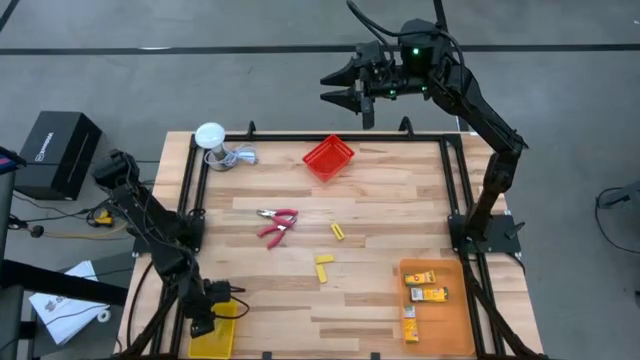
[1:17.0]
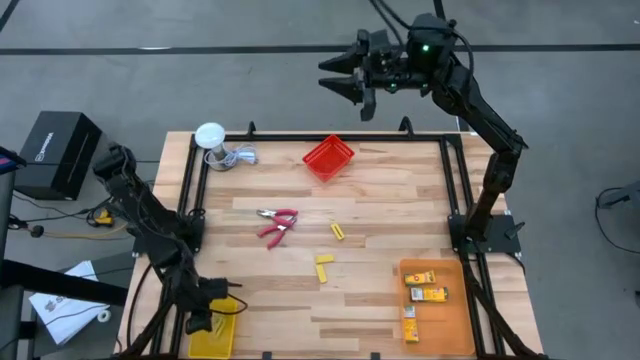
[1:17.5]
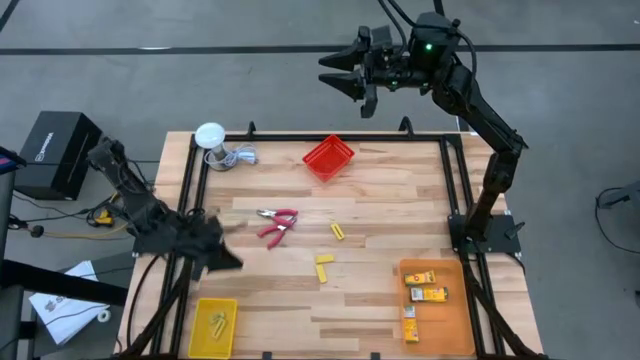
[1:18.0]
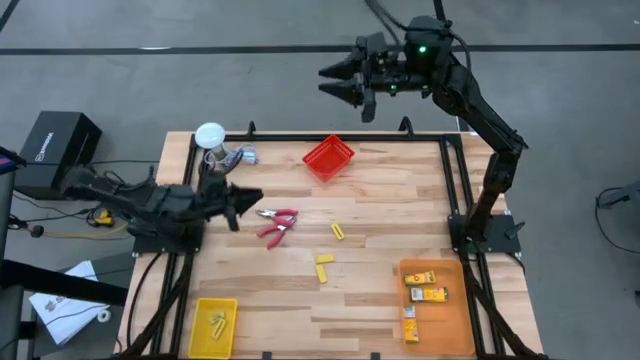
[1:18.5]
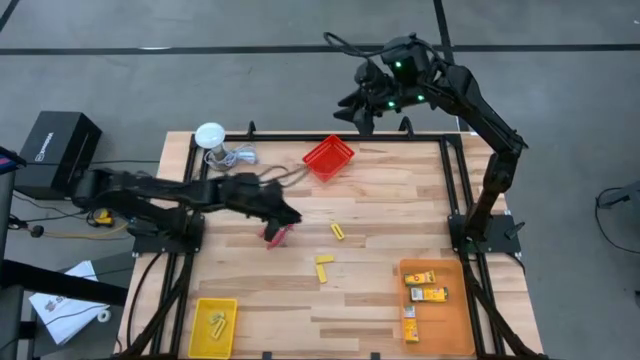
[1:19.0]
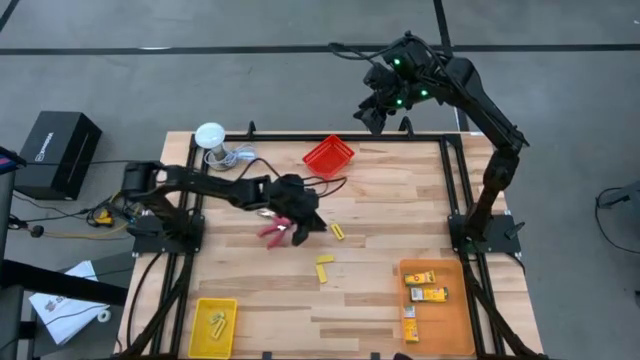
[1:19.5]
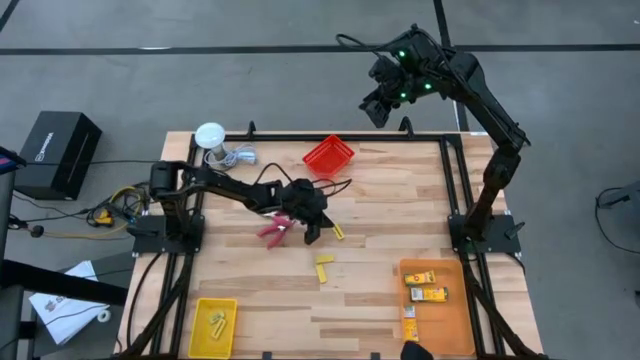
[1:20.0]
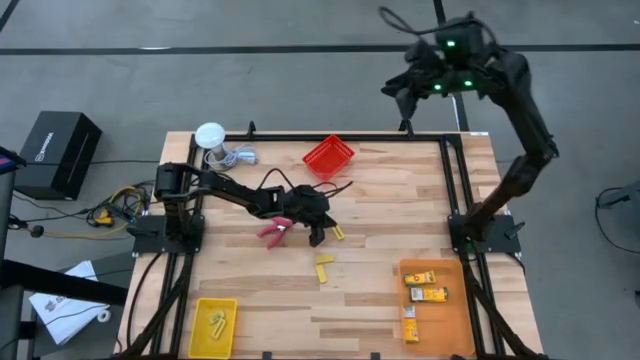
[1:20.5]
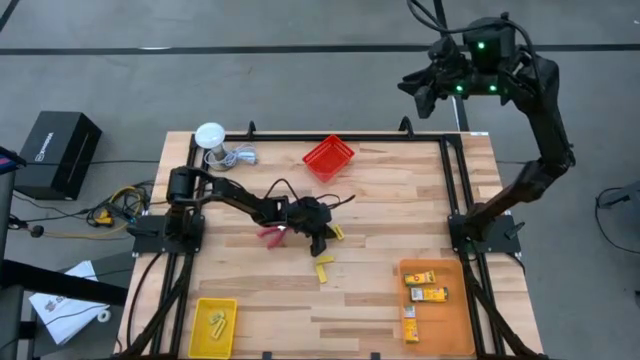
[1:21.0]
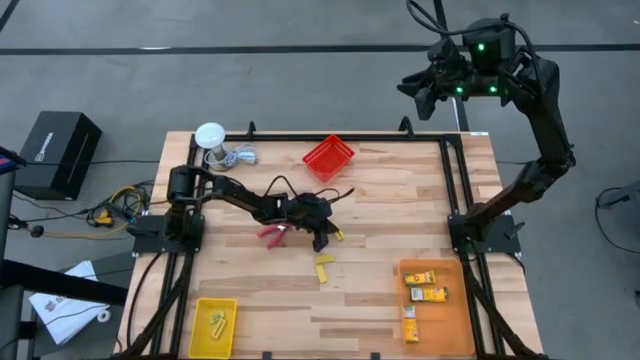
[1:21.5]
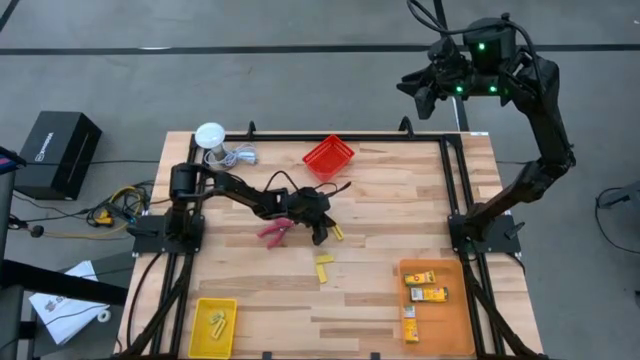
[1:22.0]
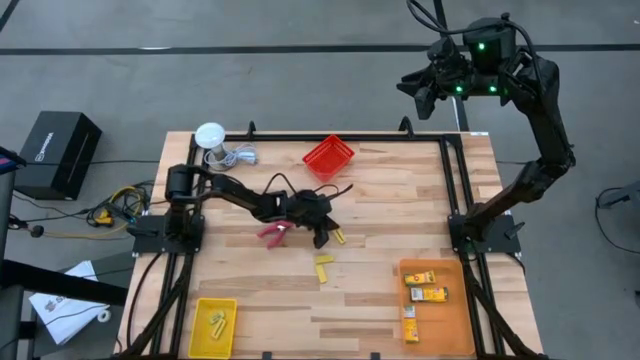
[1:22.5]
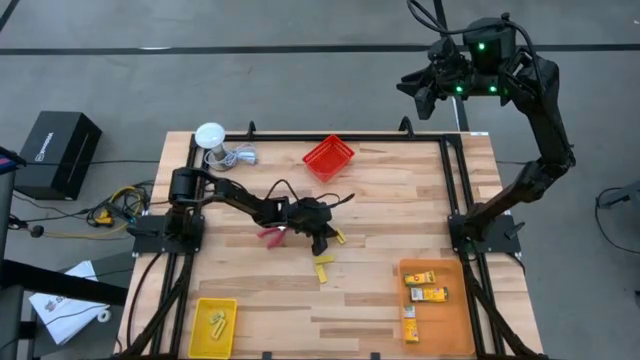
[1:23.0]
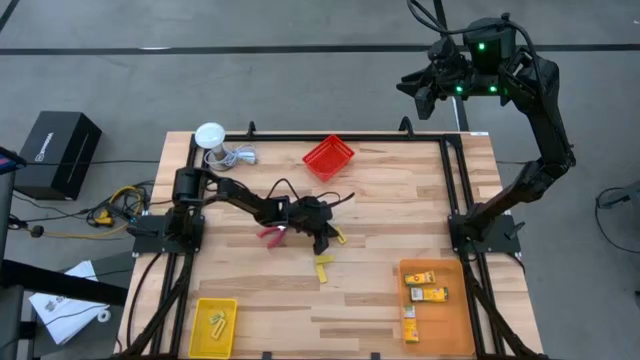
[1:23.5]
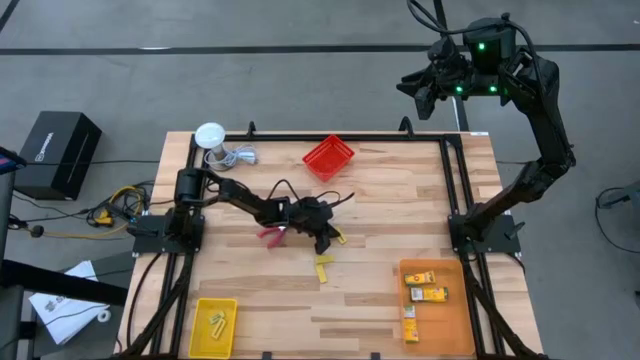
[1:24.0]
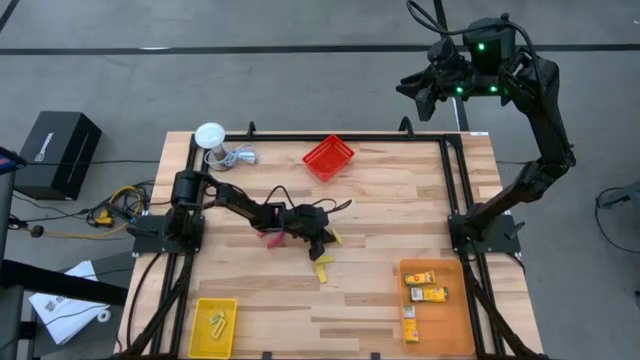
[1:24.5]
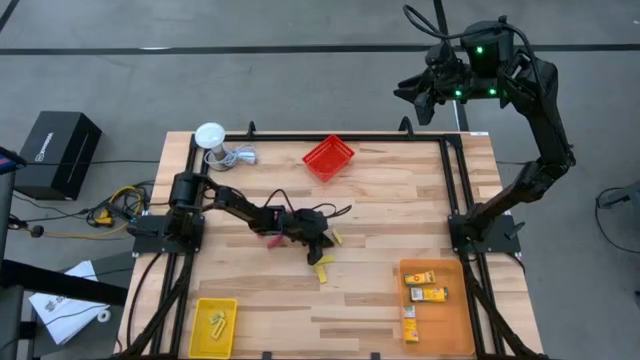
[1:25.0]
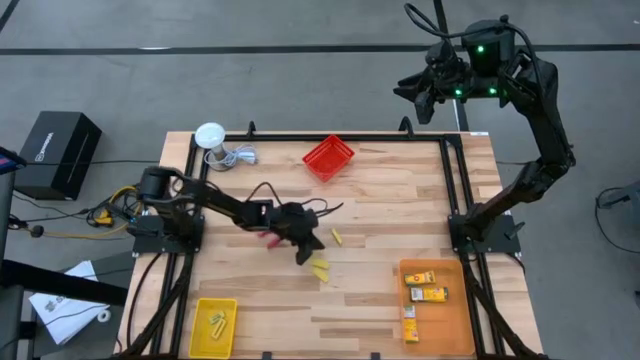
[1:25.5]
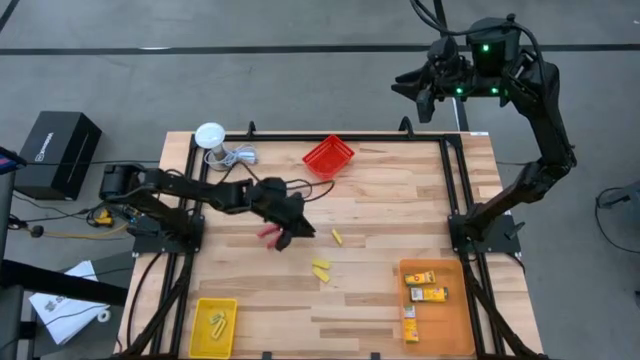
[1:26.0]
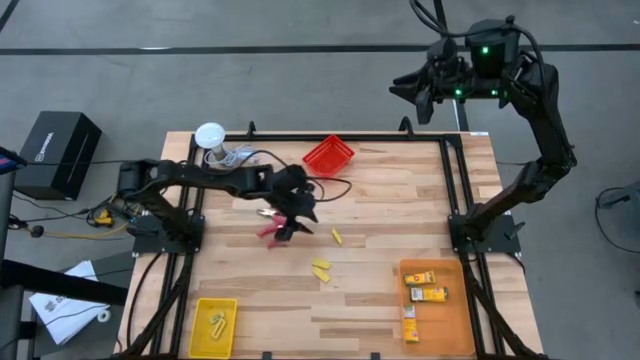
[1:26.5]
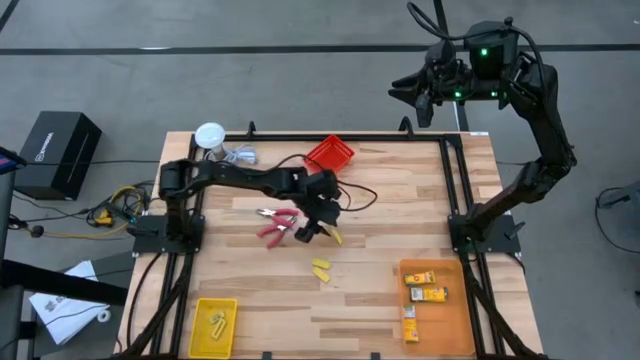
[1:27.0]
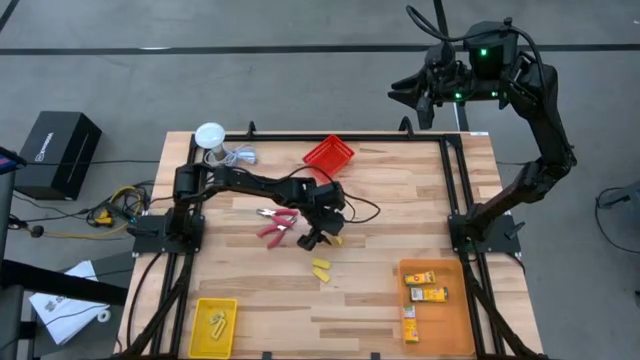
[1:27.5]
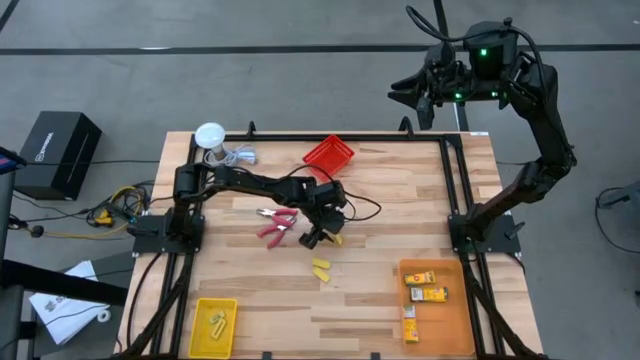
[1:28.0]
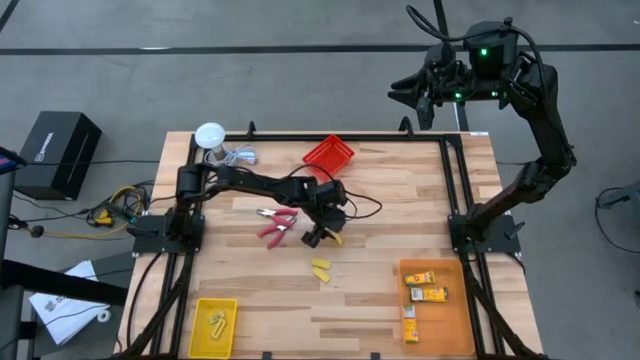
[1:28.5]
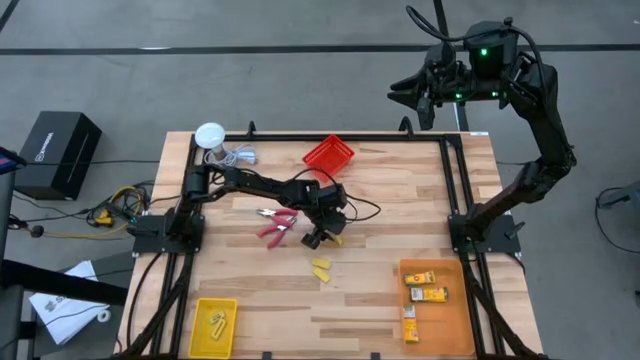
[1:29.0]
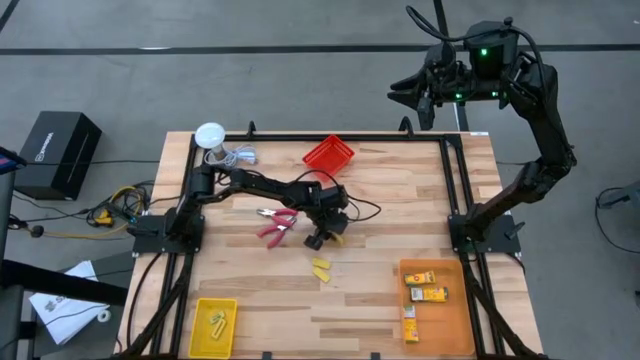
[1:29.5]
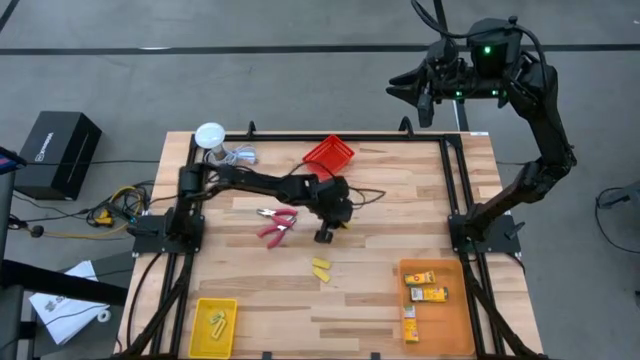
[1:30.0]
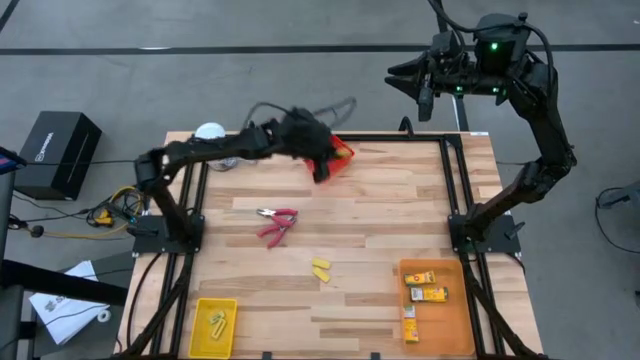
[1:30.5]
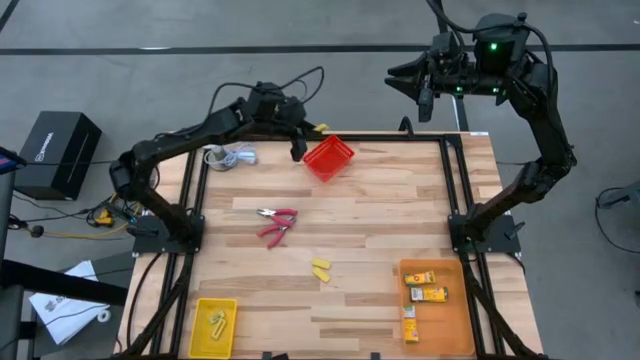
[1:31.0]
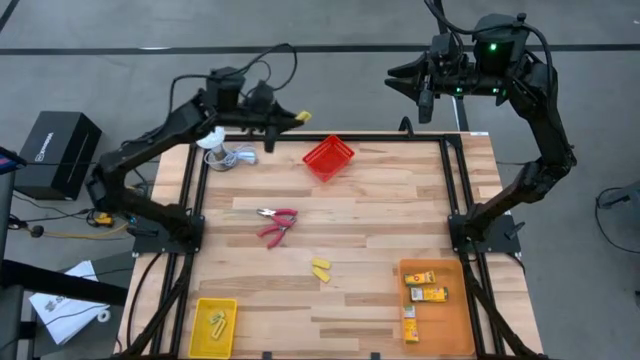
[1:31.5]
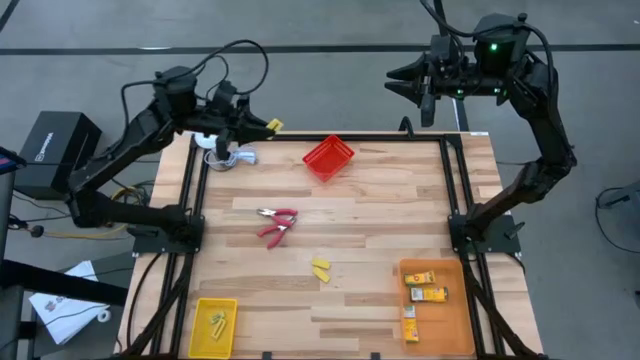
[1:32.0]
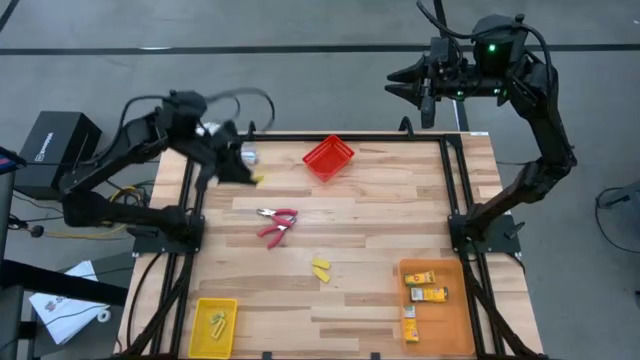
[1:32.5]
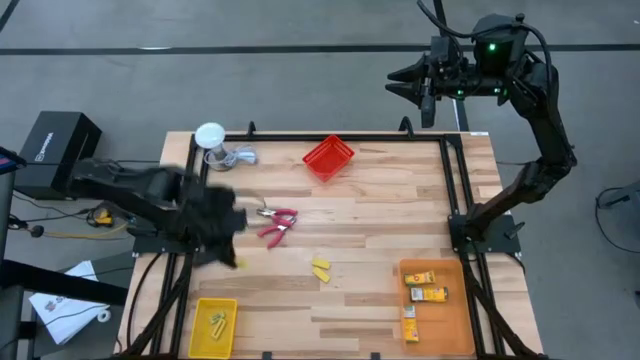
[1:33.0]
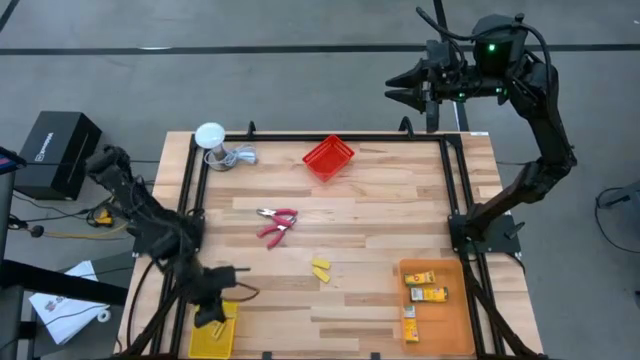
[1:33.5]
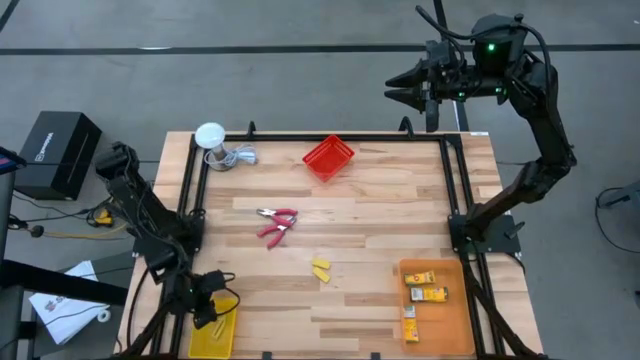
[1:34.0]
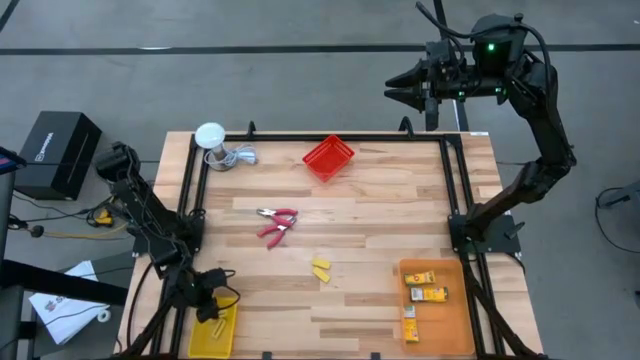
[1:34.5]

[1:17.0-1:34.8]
Task: Pick & Place School Supplies
Put the yellow eraser into the yellow bin

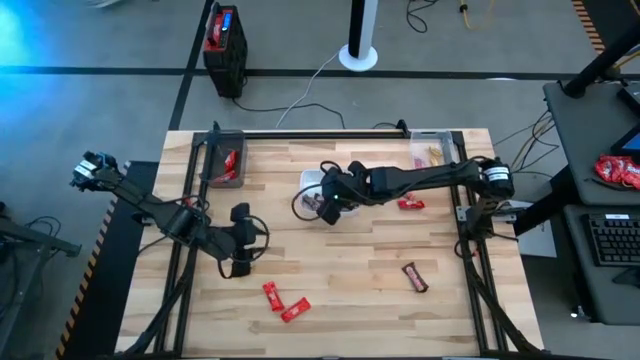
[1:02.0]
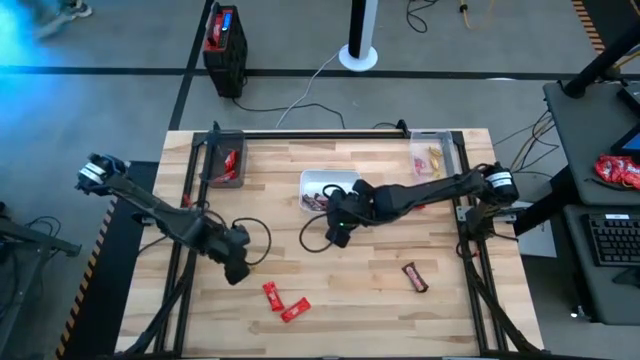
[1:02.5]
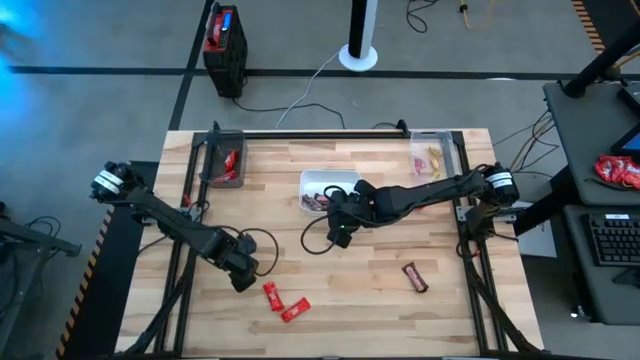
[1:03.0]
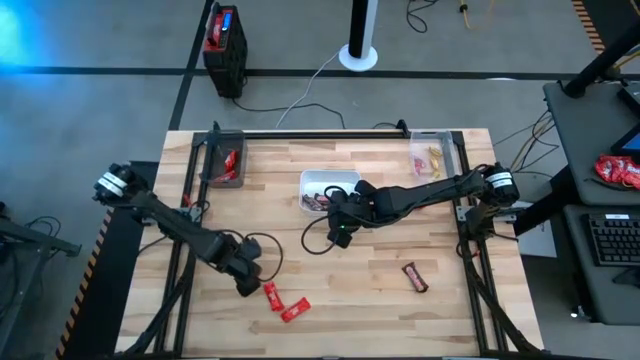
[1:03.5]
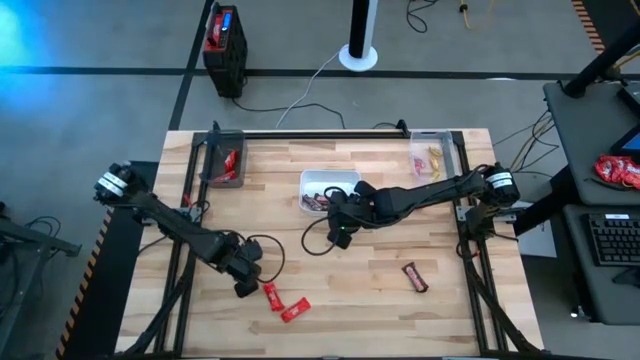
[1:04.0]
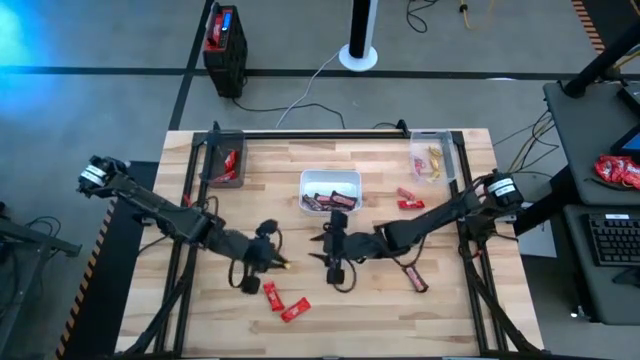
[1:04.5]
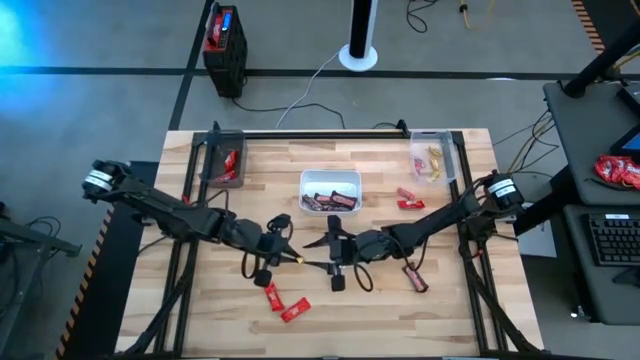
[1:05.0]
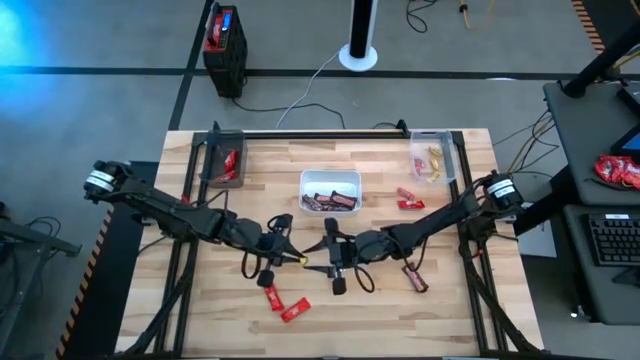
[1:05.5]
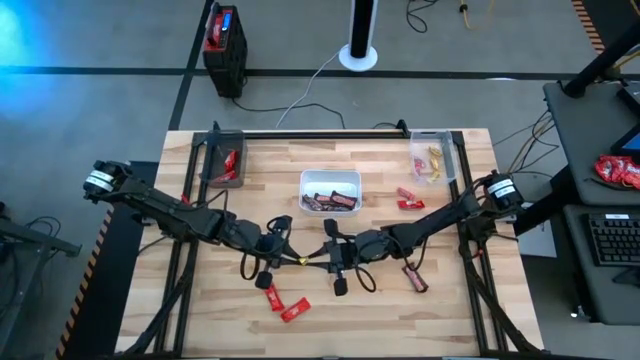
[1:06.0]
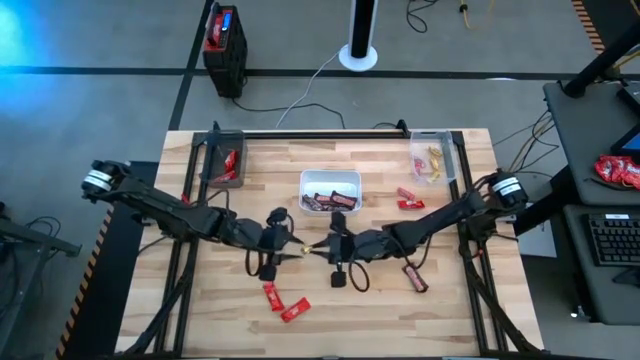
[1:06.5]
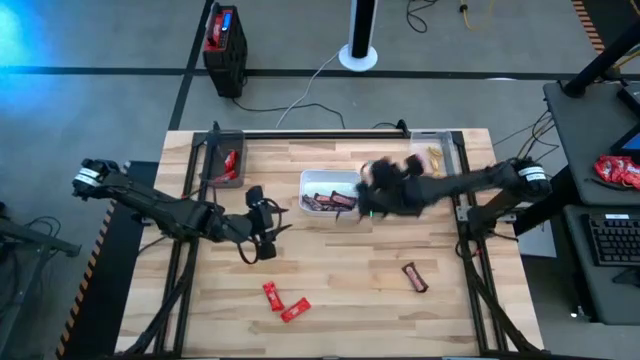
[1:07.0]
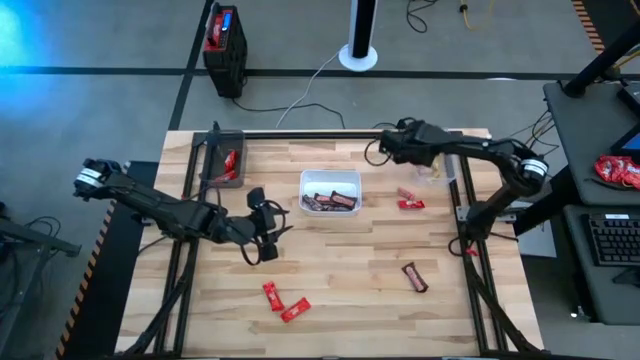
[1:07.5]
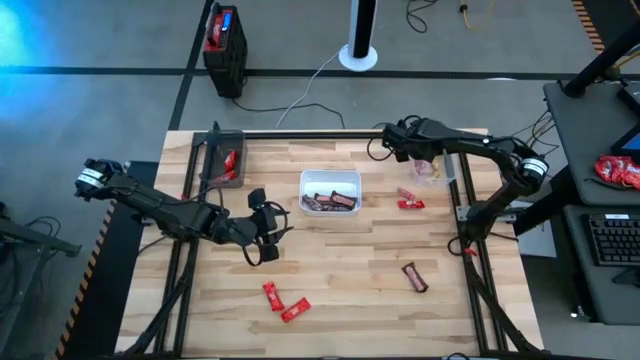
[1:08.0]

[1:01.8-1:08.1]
Task: Sort candy by brand, put in halloween buckets
Put the yellow candy into the transparent bin
